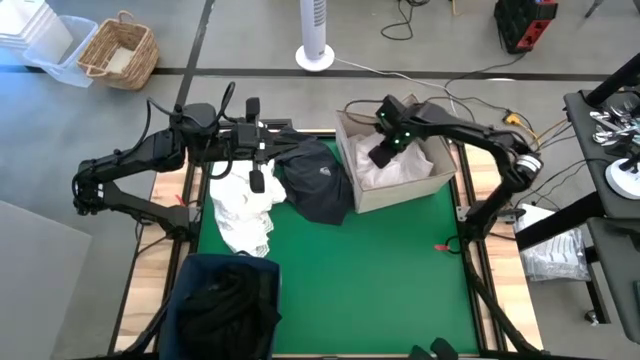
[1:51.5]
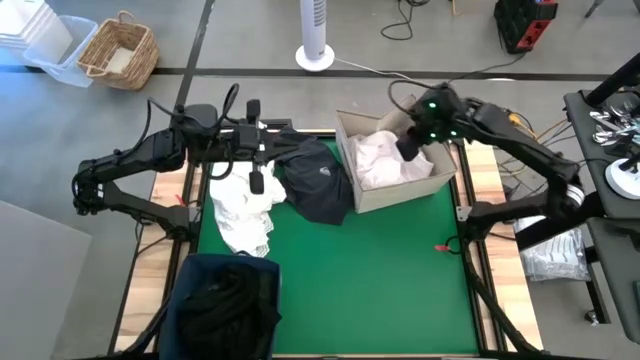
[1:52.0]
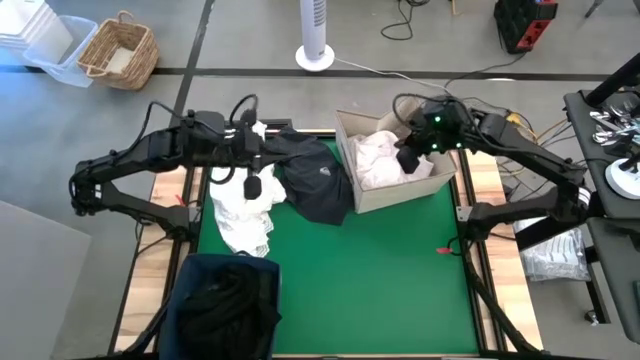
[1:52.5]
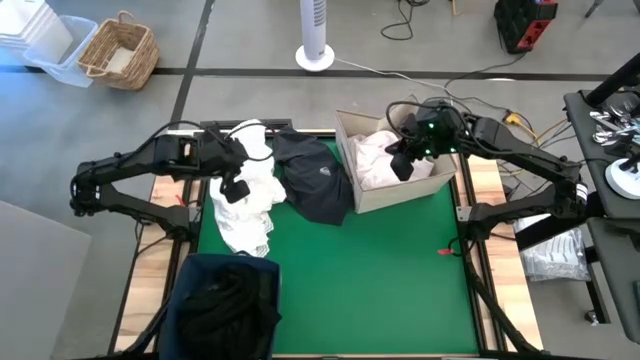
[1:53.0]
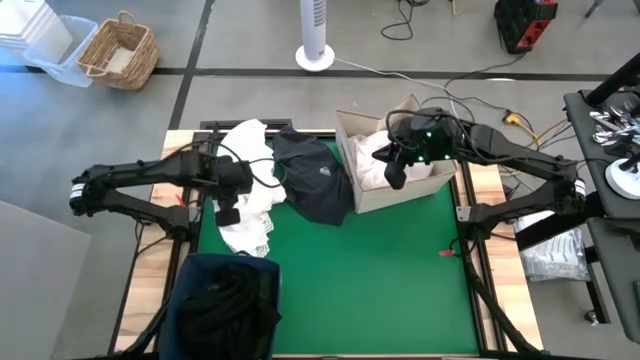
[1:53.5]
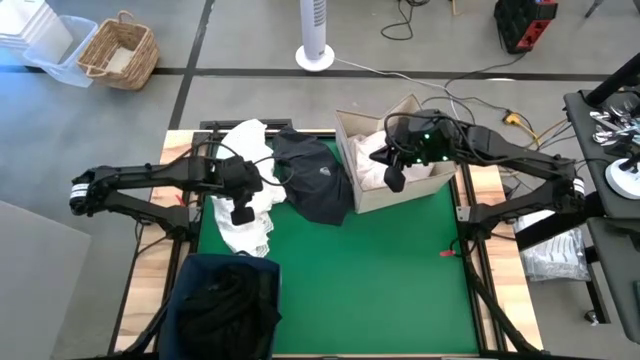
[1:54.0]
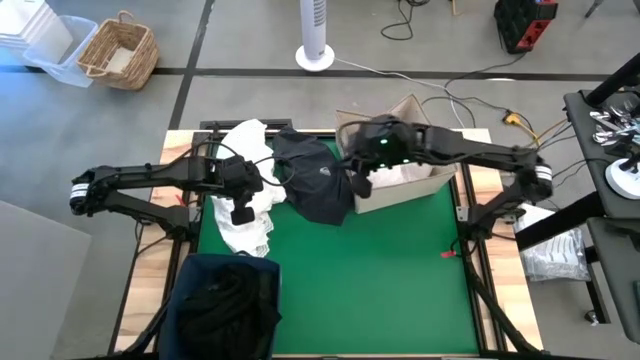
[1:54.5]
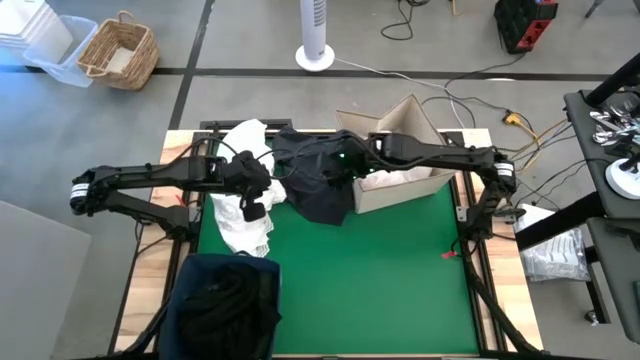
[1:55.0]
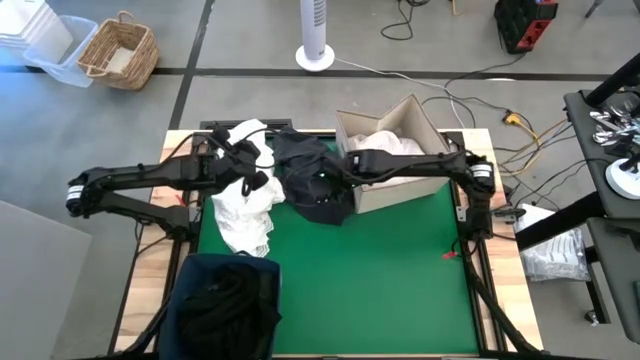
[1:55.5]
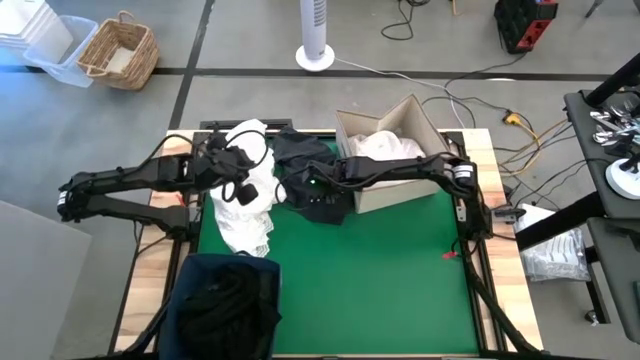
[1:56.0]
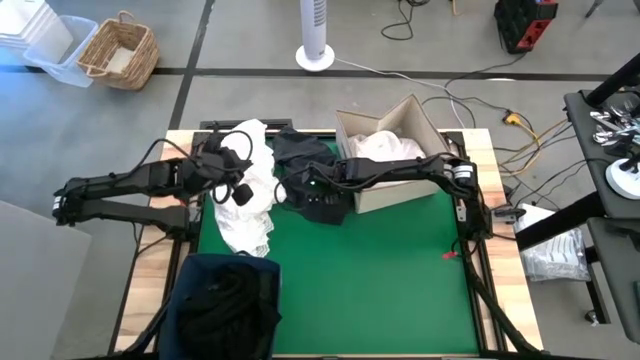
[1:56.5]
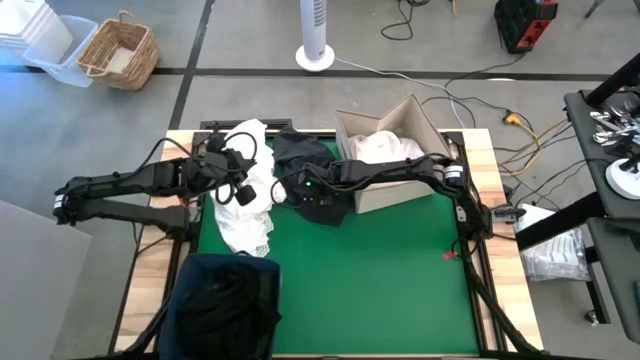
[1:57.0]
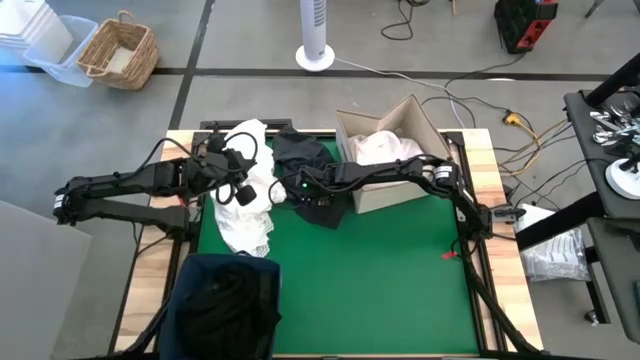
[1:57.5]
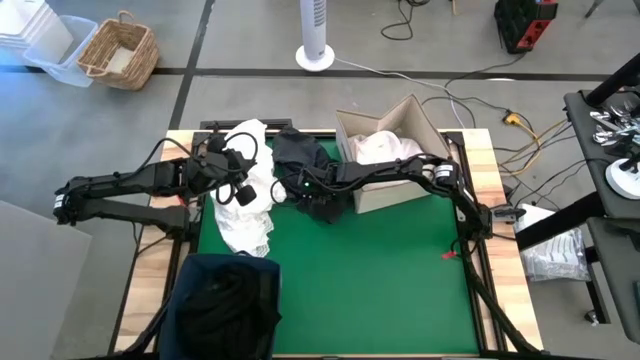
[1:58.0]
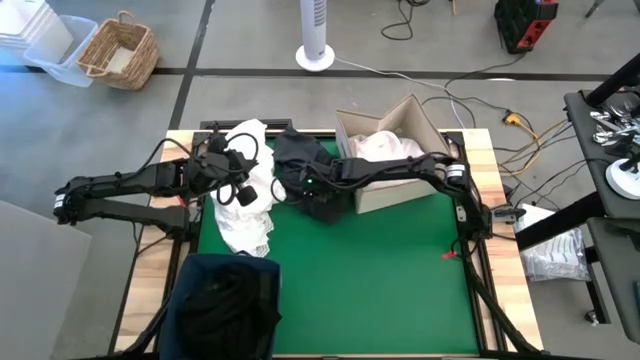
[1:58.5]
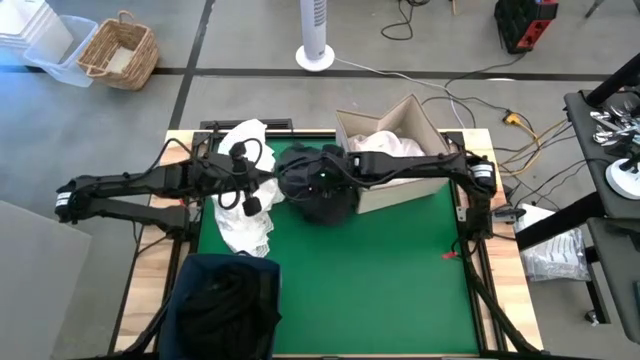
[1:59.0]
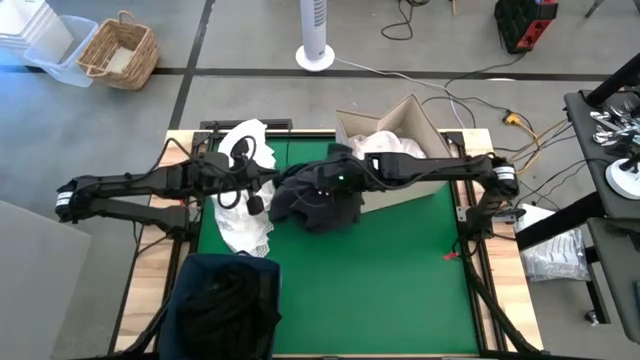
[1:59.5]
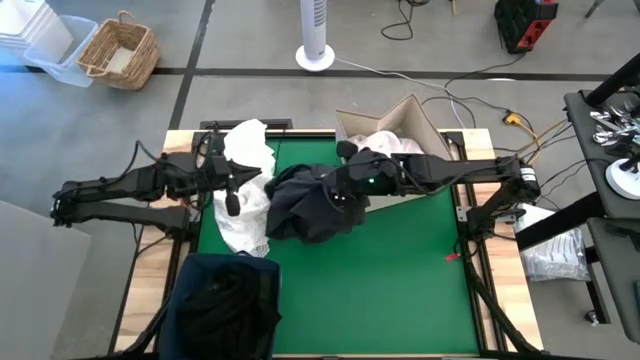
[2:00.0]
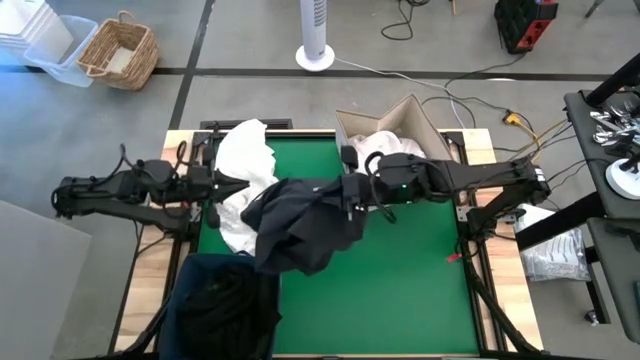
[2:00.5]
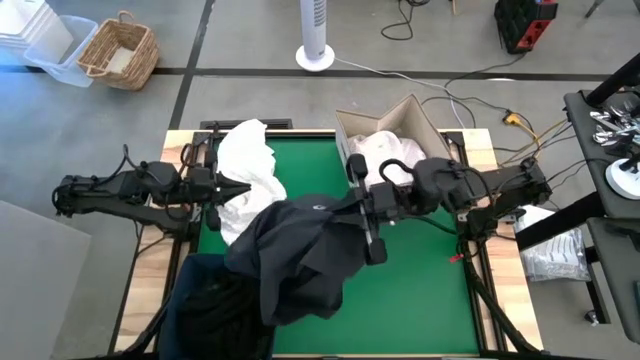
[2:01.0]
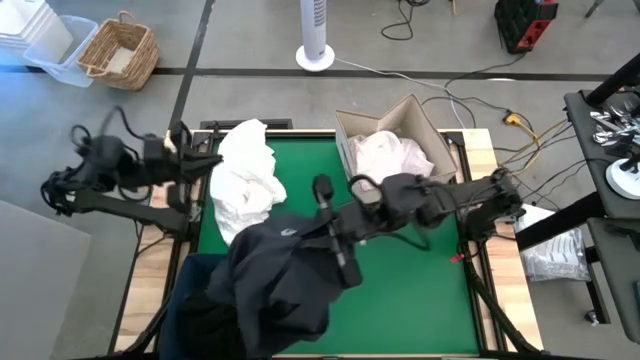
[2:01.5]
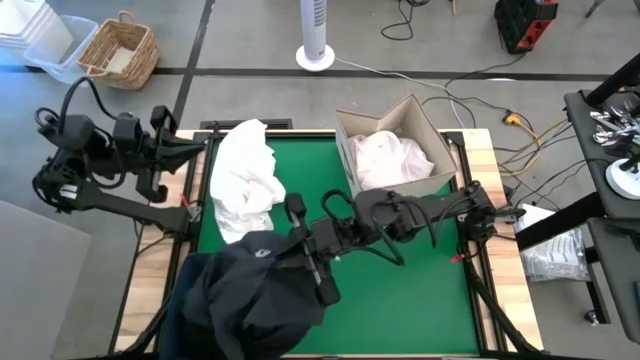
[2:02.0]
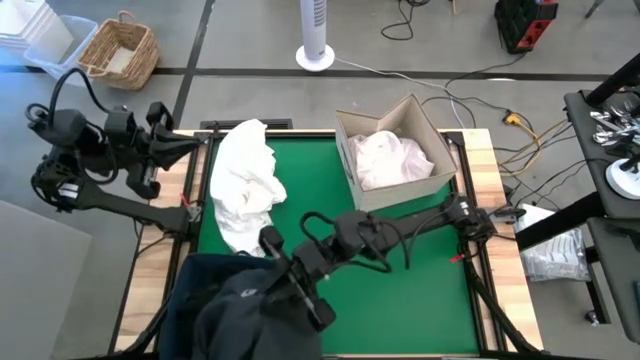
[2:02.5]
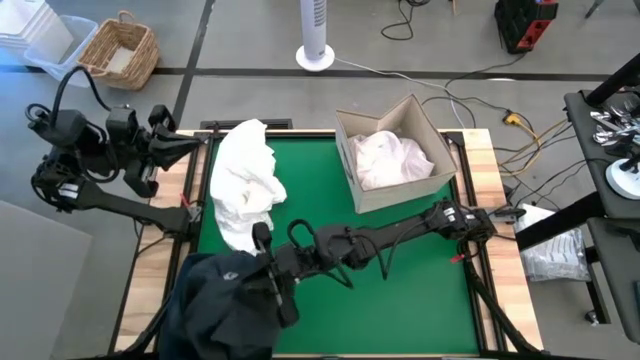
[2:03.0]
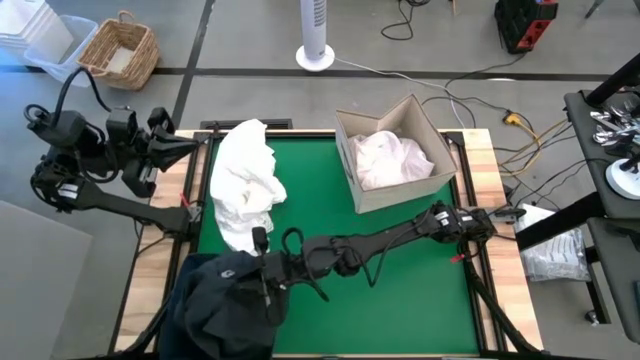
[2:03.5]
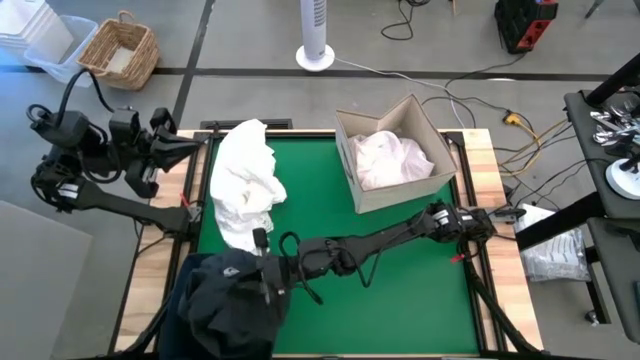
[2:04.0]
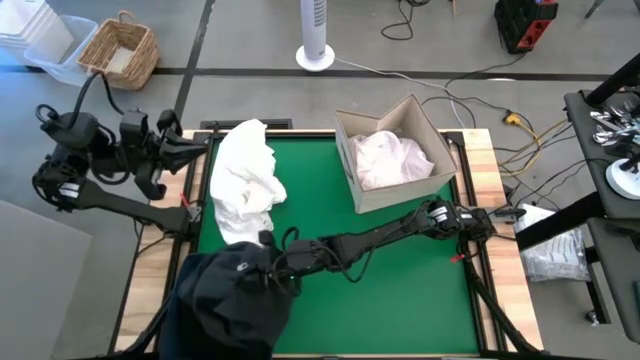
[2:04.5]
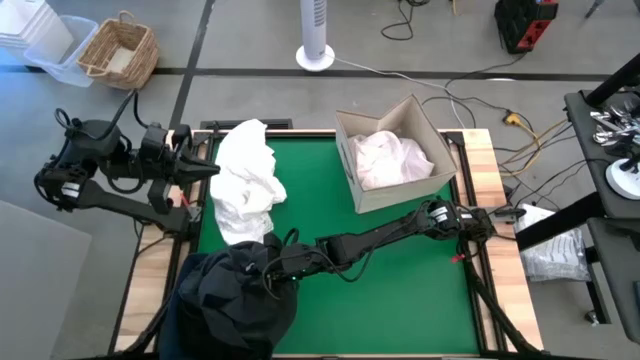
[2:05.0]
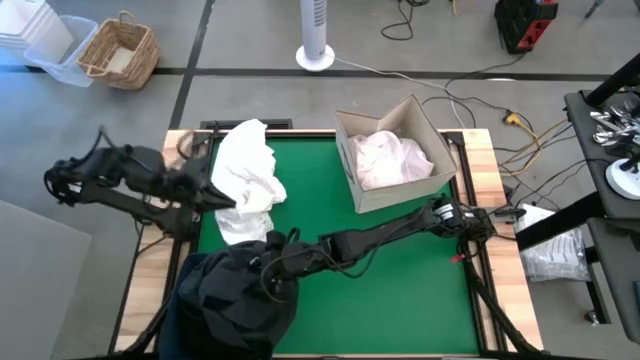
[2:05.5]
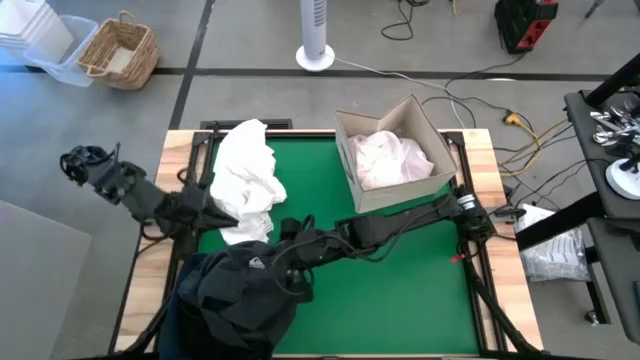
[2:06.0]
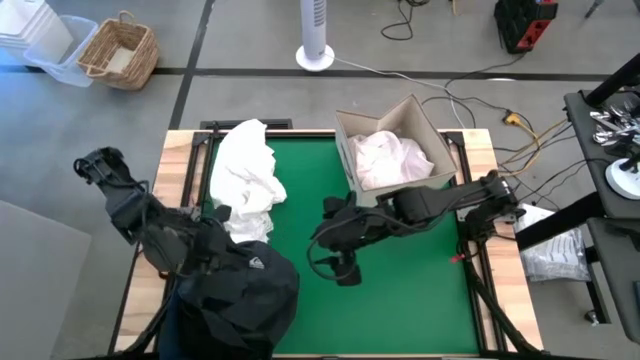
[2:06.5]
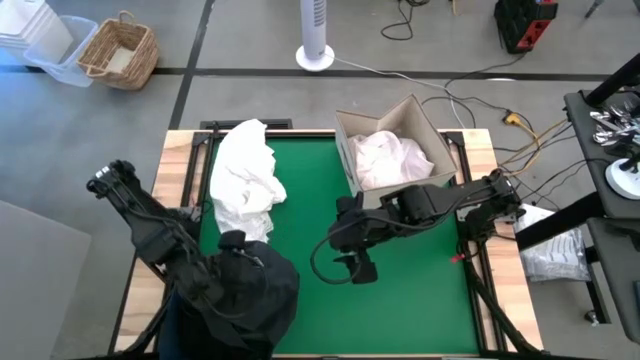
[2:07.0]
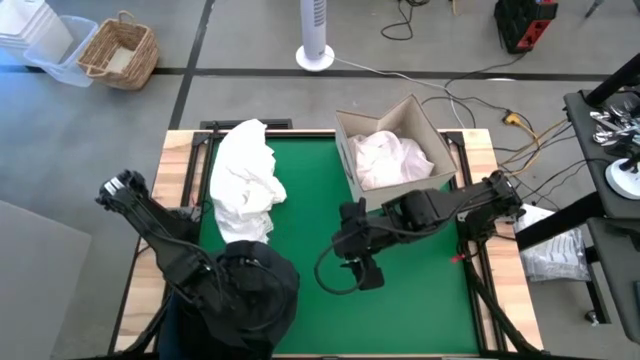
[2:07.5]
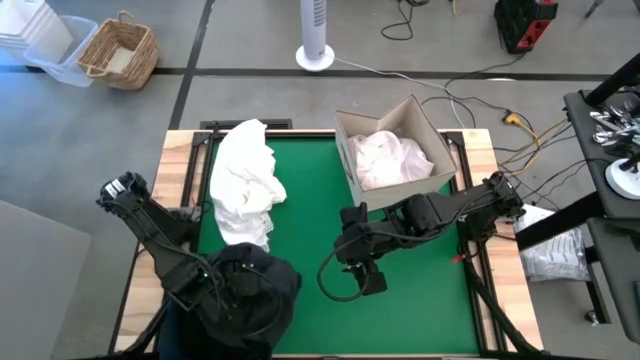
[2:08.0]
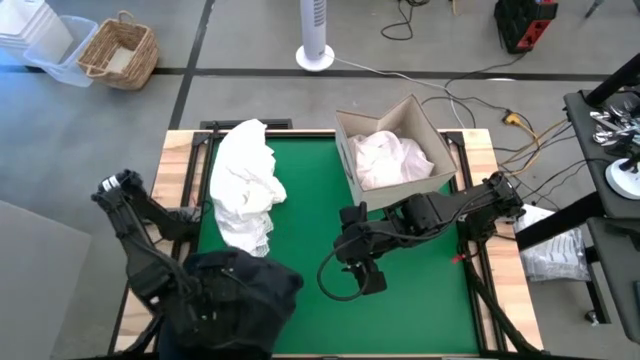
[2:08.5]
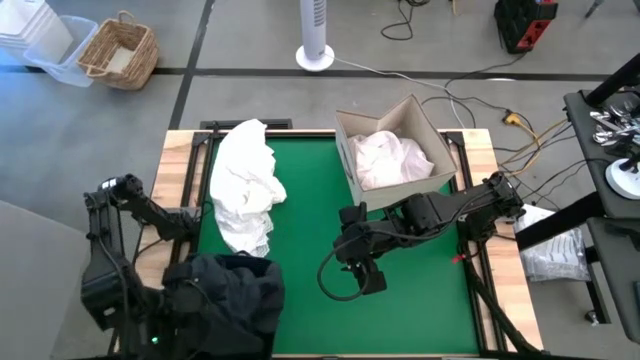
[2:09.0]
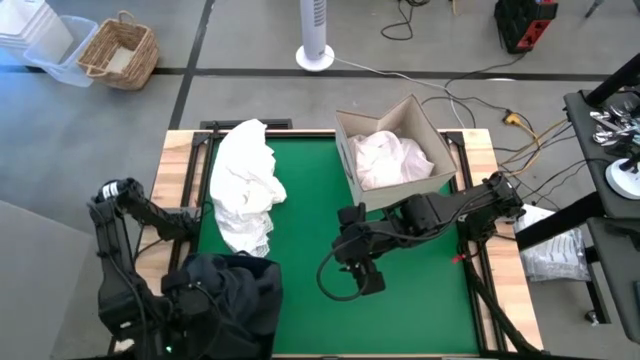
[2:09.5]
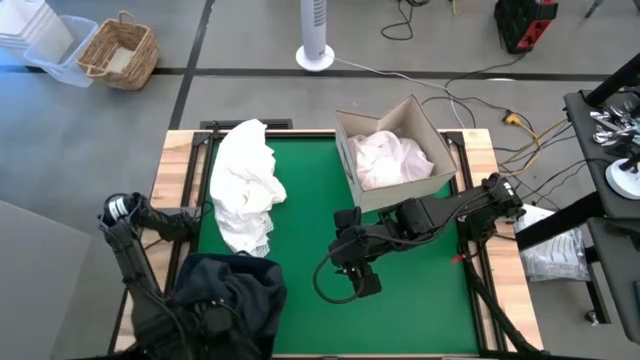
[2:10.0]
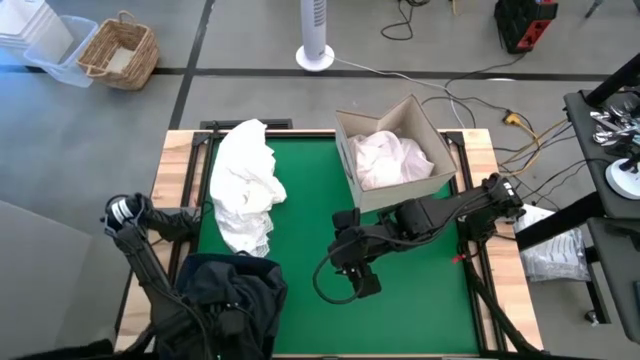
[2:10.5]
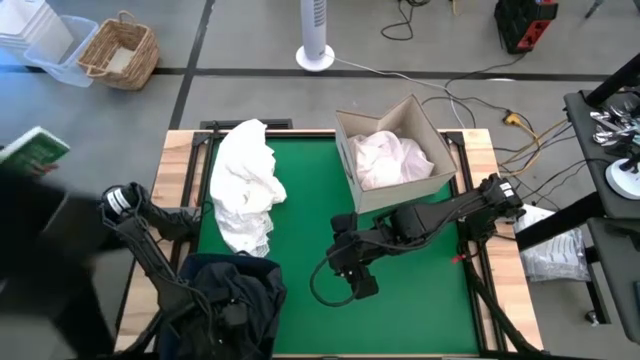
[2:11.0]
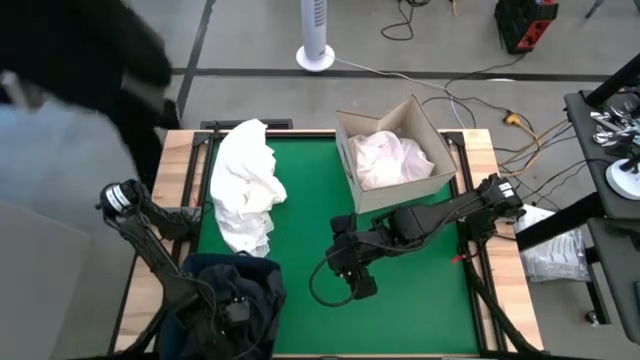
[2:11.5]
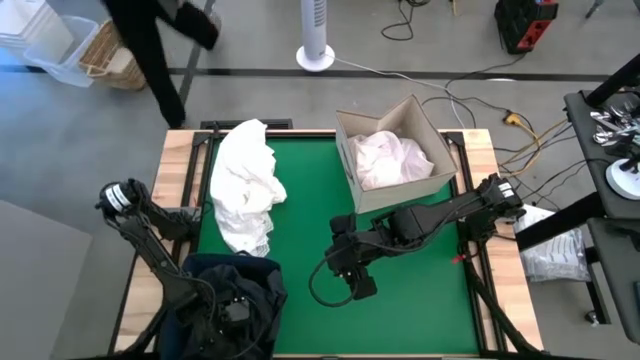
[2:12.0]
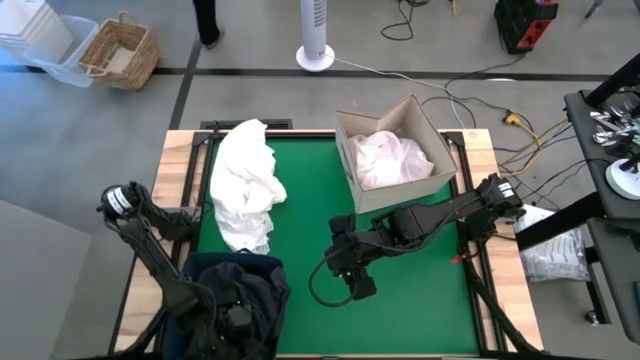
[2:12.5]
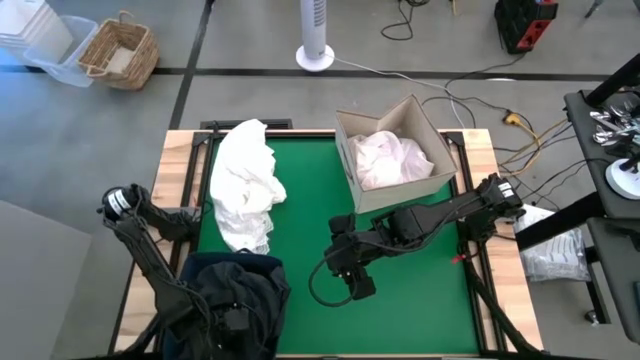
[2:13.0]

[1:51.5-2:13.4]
Put the black shorts into the blue laundry organizer
